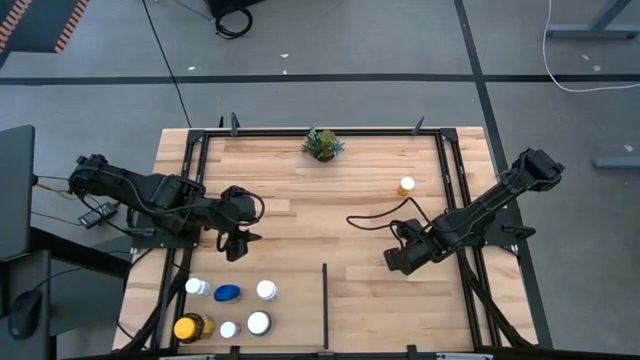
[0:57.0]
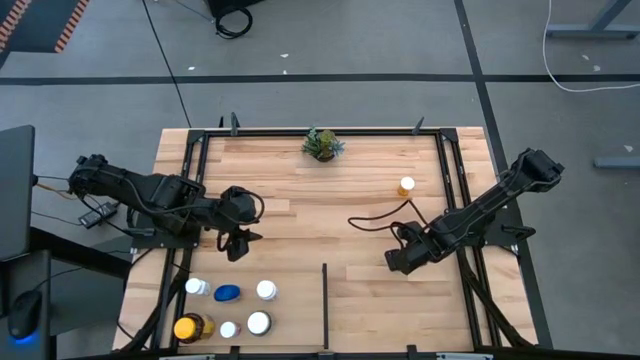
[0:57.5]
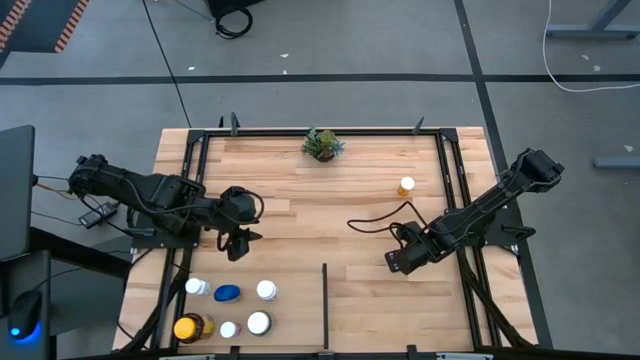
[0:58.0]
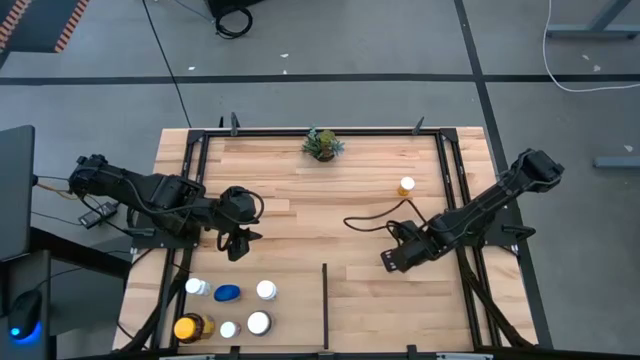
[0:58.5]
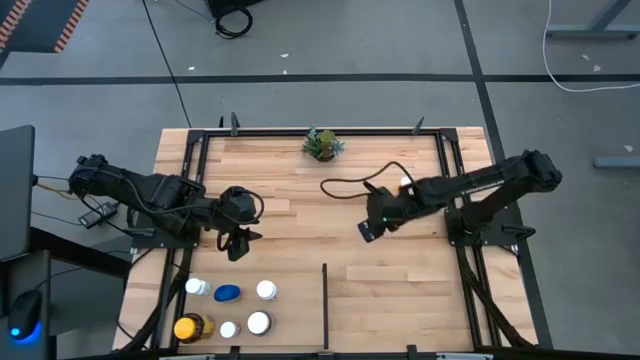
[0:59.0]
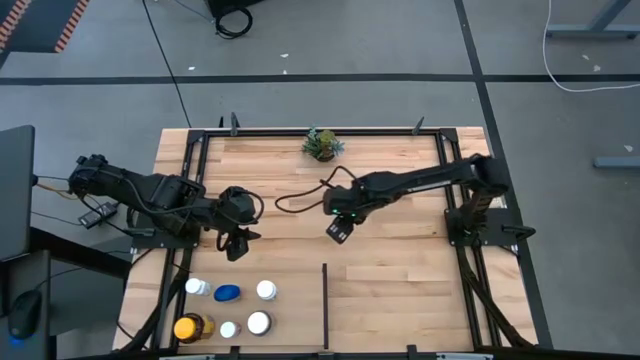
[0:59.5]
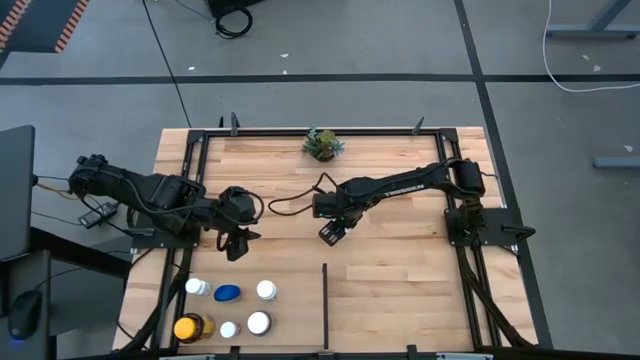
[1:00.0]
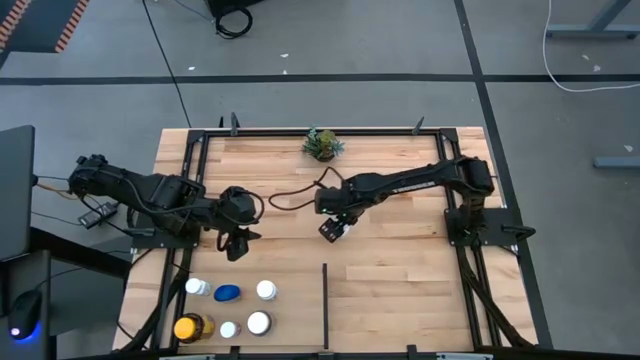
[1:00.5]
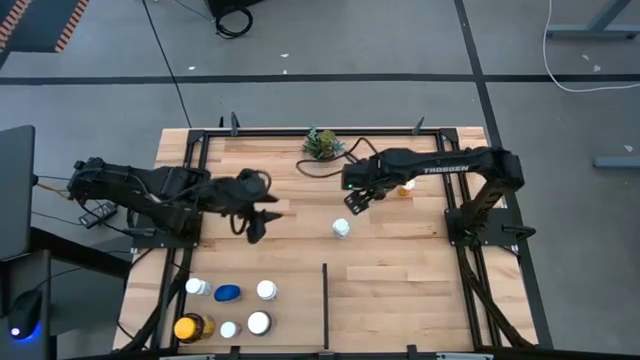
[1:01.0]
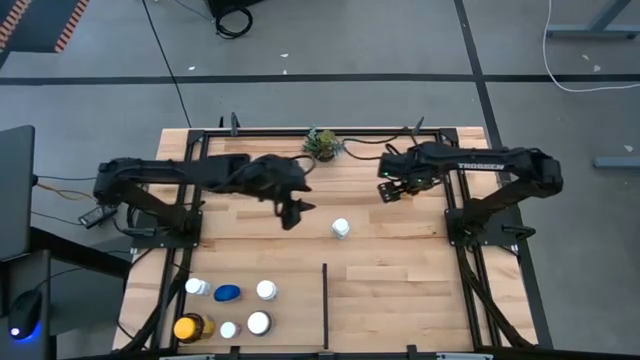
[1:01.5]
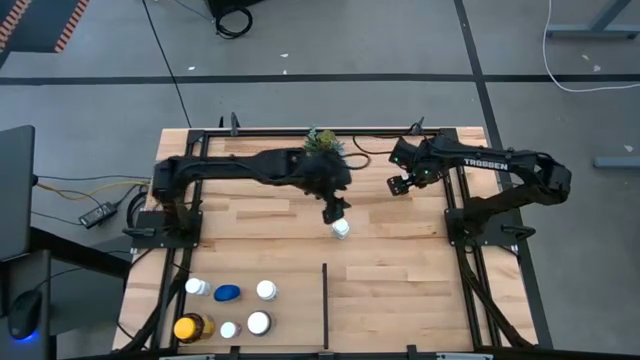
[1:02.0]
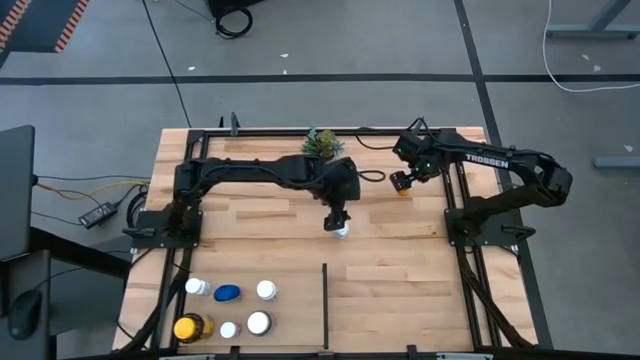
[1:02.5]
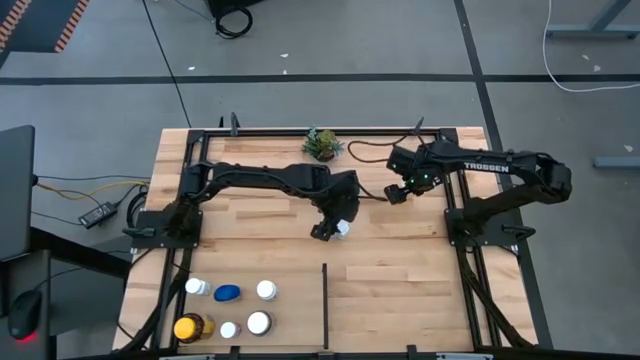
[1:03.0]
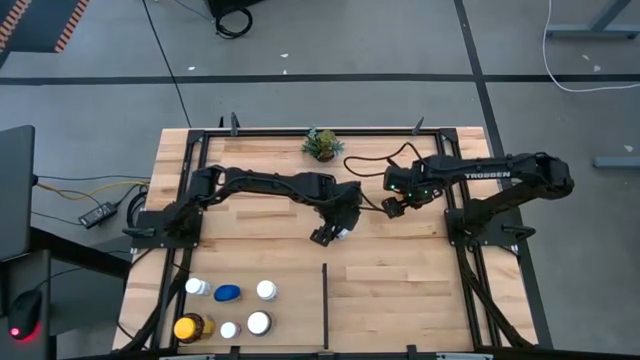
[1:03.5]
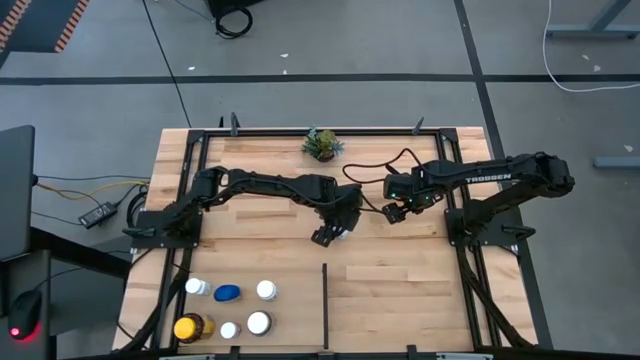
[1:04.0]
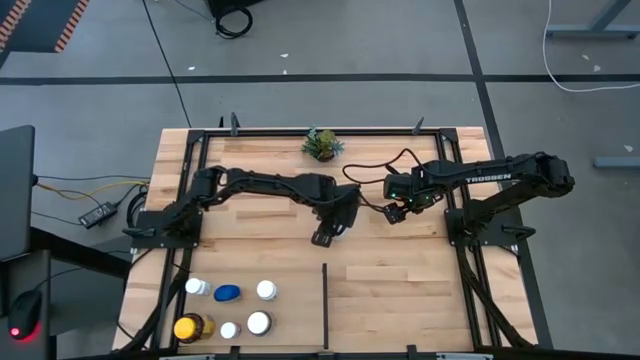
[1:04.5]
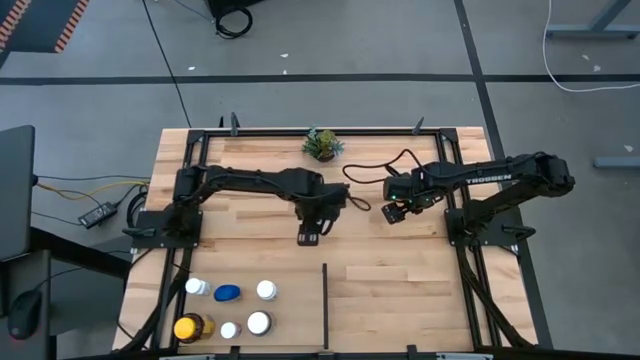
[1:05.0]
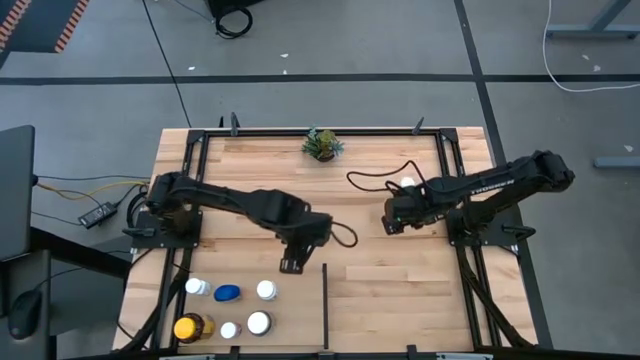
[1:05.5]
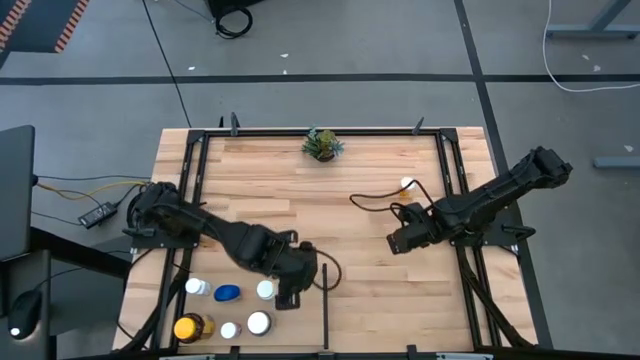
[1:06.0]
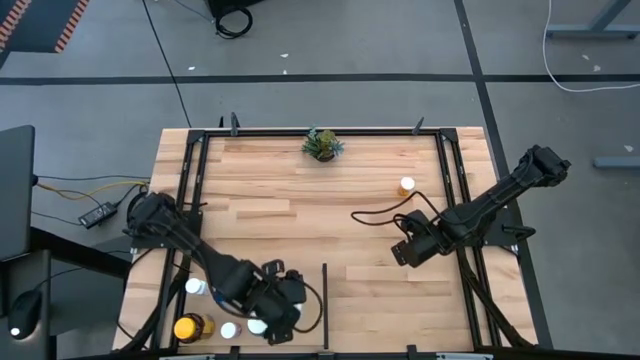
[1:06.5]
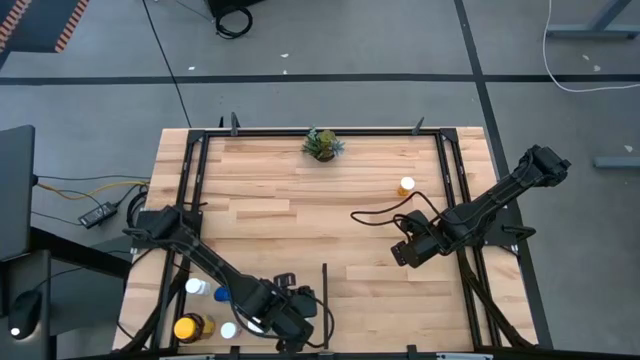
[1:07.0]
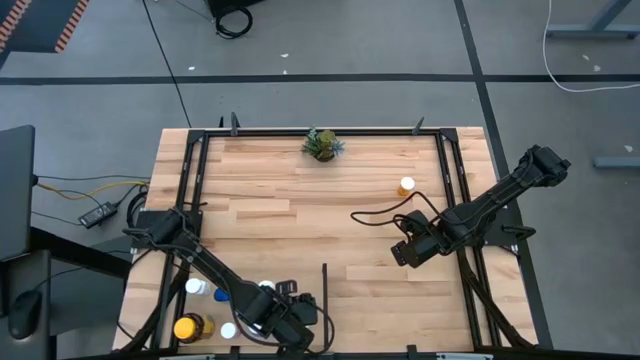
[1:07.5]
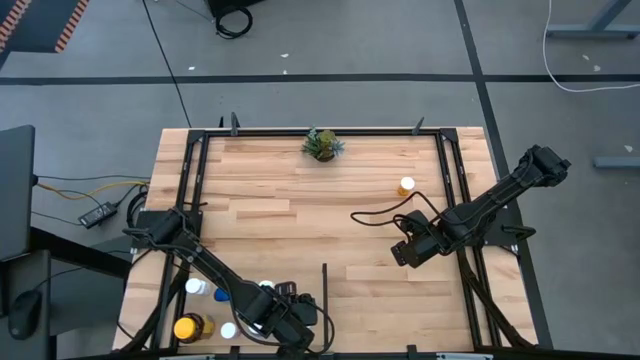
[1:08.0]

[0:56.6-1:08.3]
Task: Pick and place medicine bottles onto shelf by color
Put the white and blue medicine bottle on the shelf

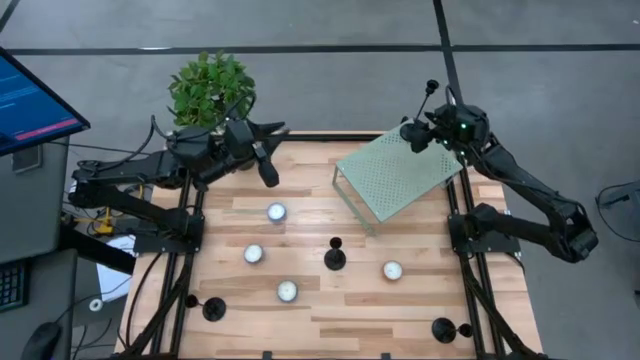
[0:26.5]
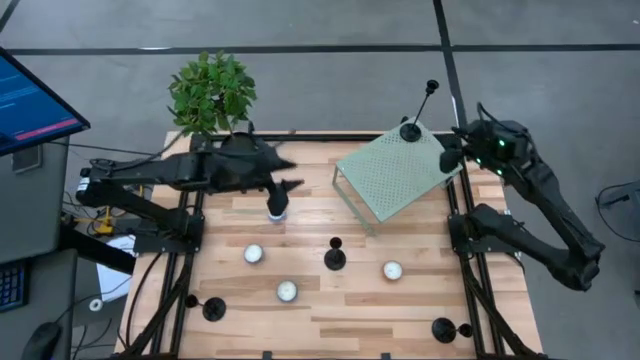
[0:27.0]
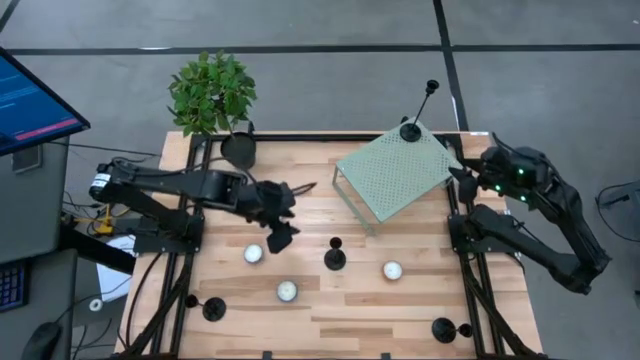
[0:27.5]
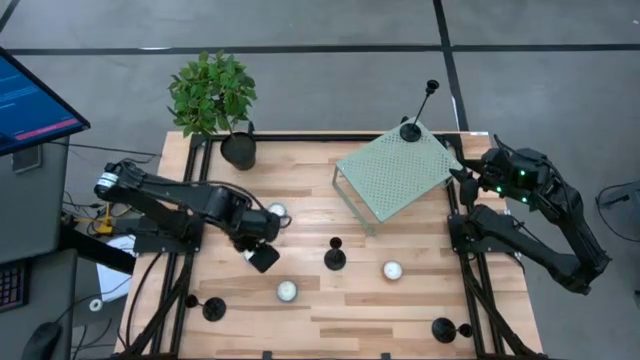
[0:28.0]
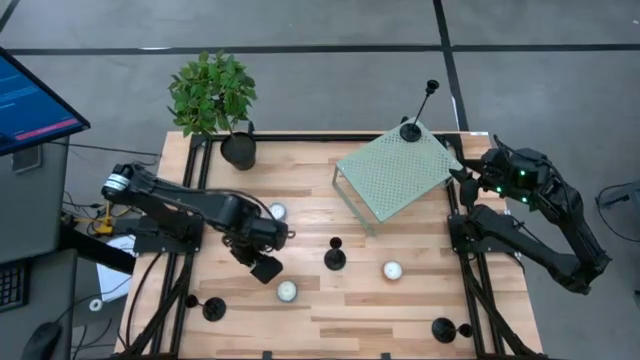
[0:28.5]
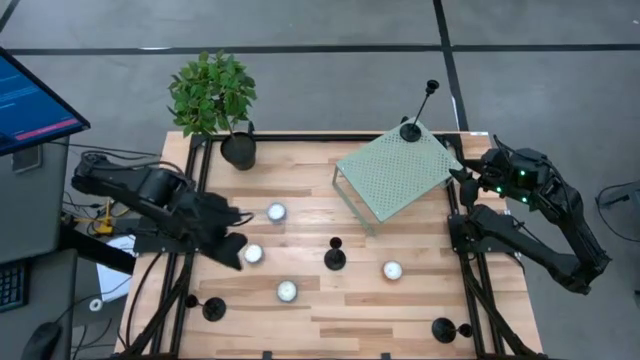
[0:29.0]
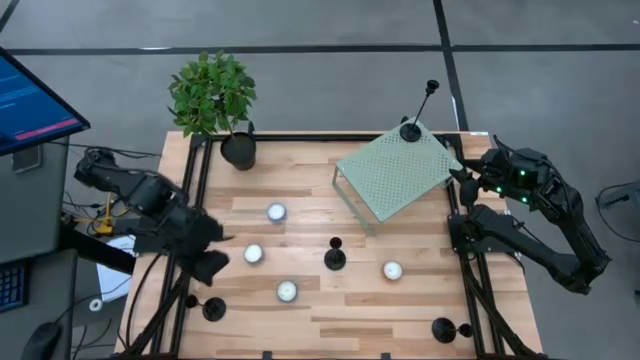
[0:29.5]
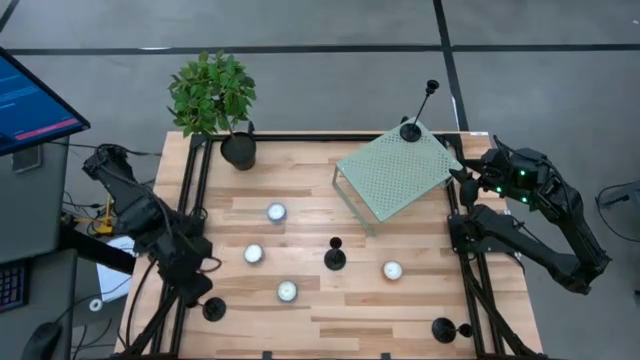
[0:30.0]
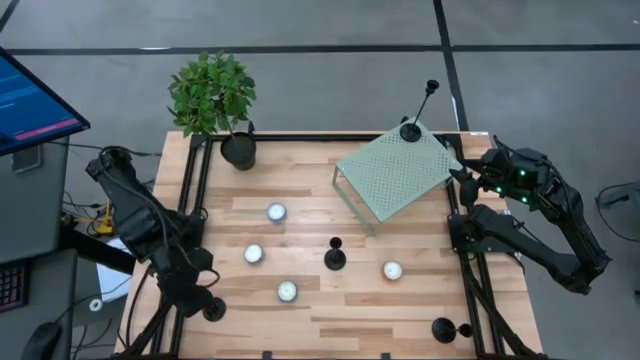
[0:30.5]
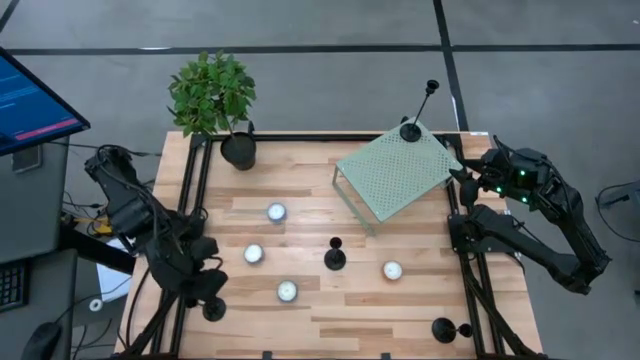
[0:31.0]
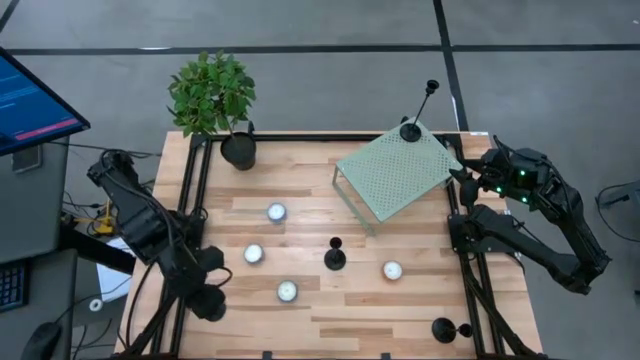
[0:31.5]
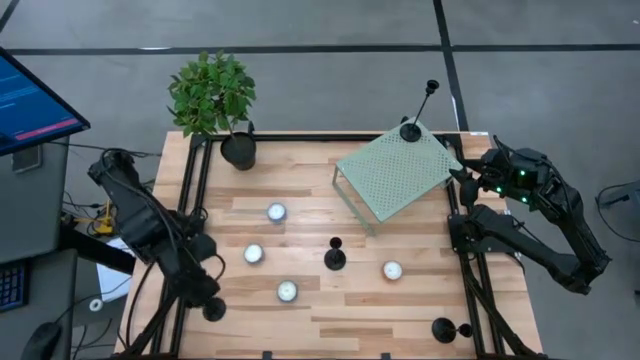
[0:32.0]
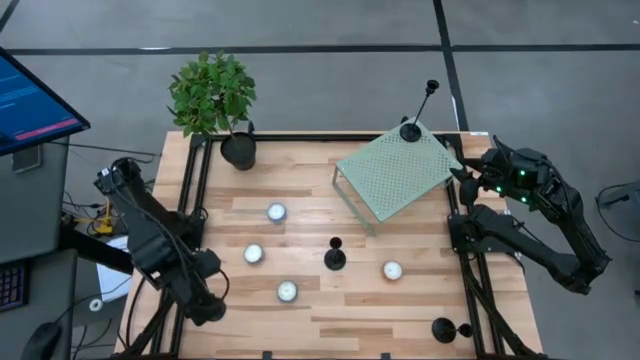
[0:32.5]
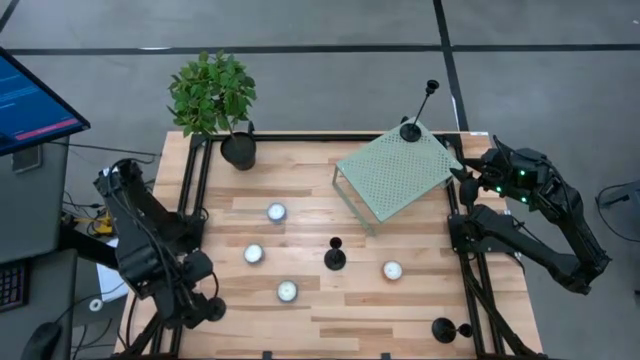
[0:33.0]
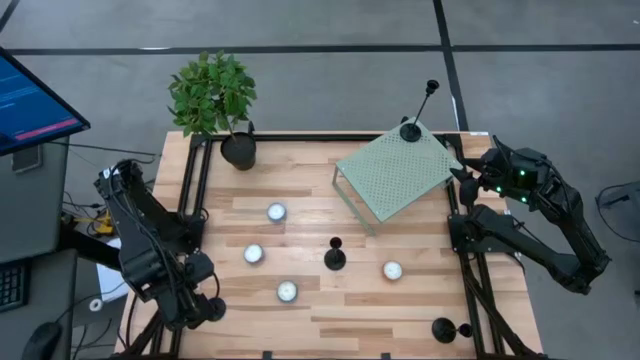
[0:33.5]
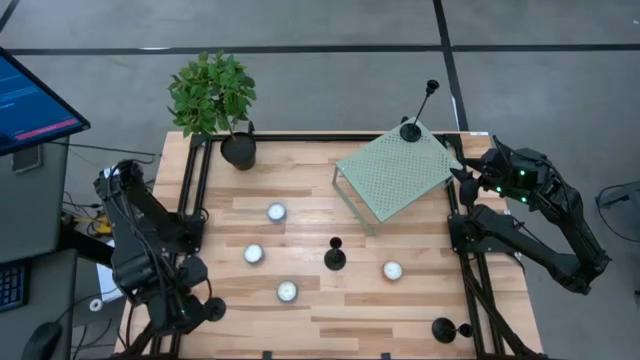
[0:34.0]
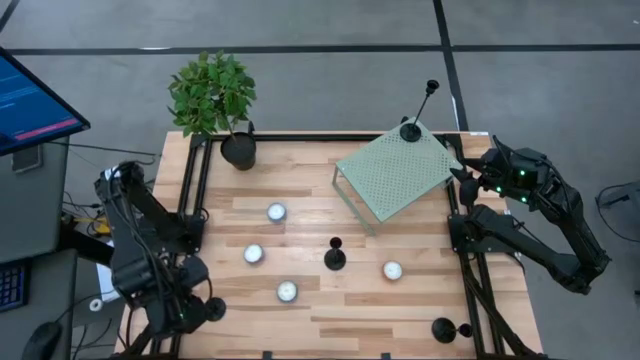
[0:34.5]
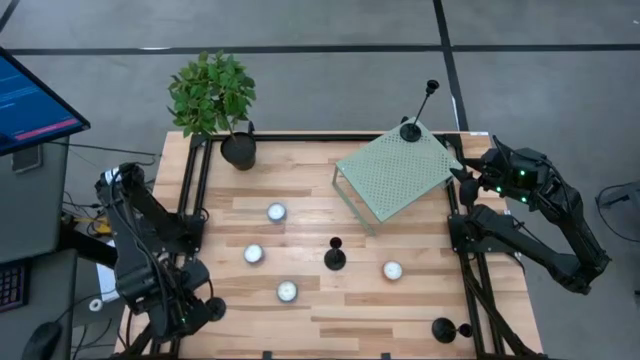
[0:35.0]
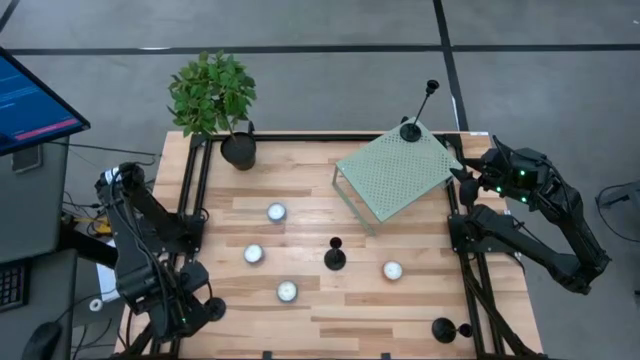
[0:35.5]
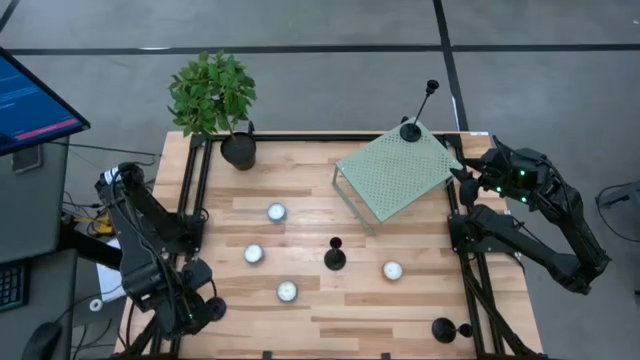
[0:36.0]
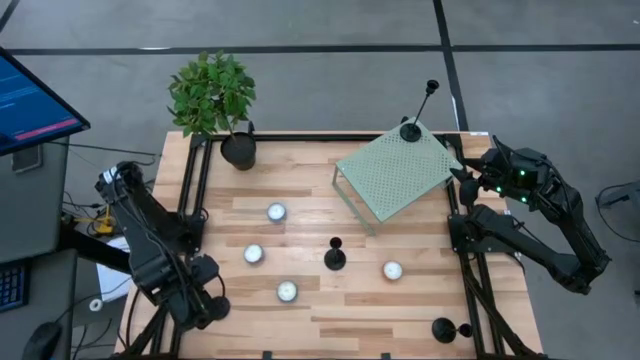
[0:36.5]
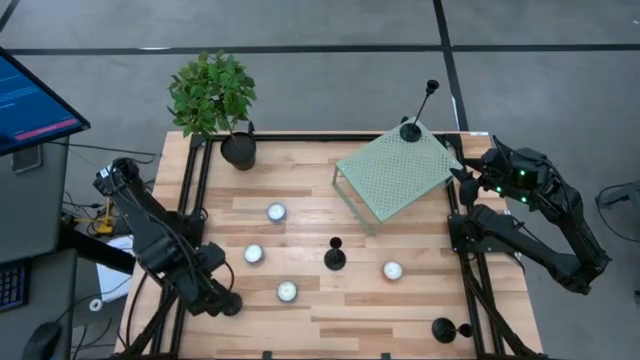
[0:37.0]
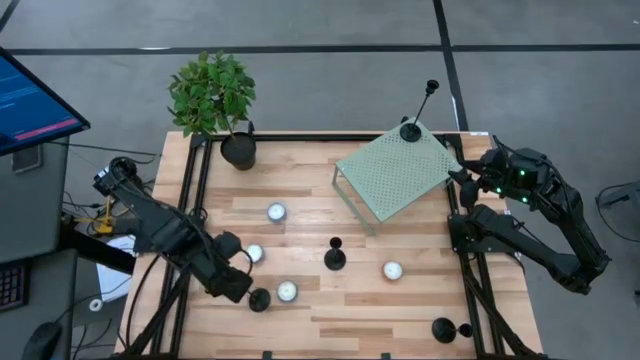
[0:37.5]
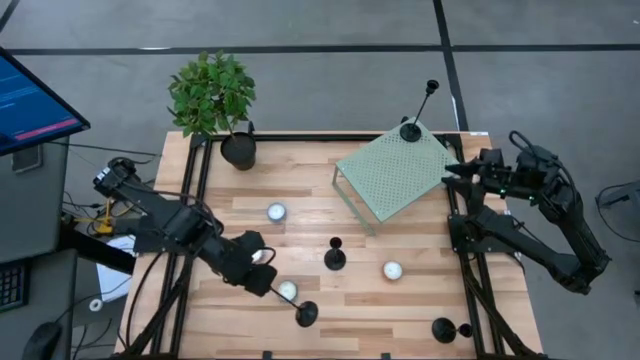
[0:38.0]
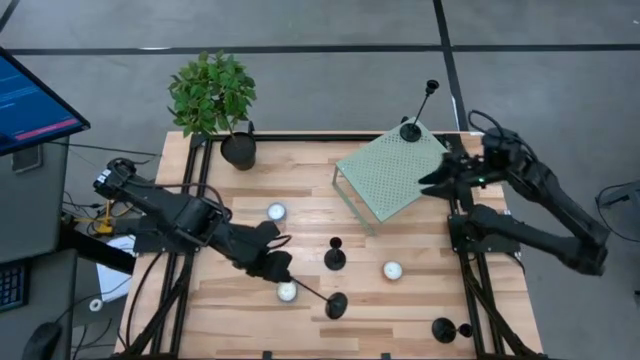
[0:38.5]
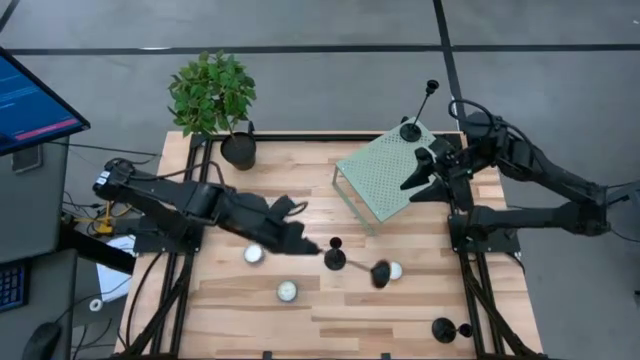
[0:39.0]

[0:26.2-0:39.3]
Task: Pick & Place candle stick holders
Align the black candle holder with the other black candle holder on the shelf
